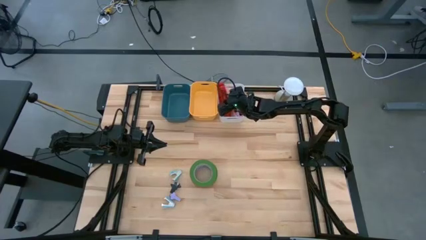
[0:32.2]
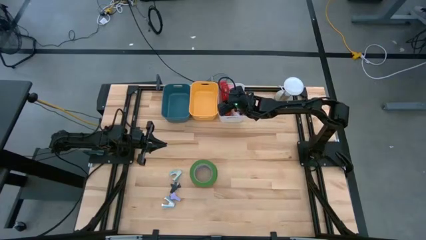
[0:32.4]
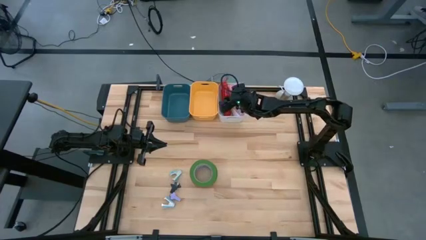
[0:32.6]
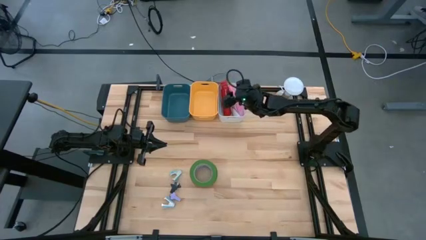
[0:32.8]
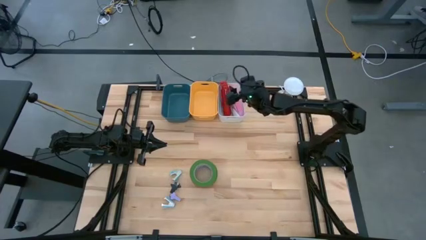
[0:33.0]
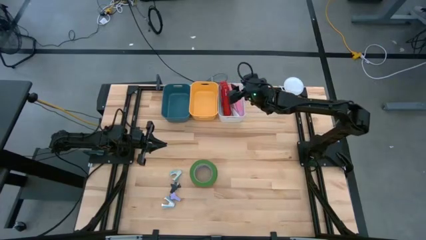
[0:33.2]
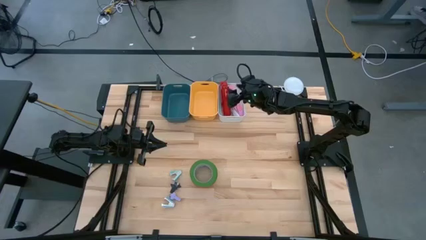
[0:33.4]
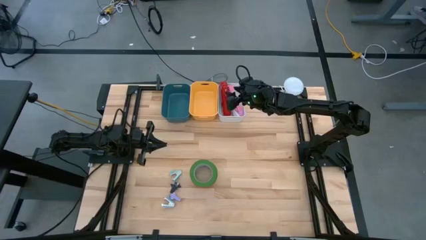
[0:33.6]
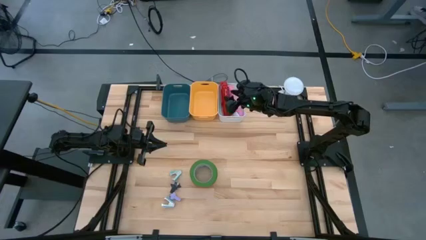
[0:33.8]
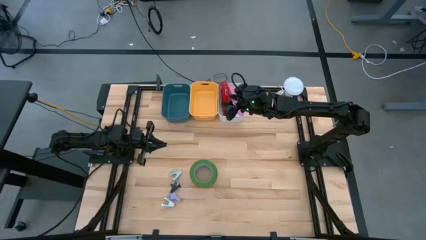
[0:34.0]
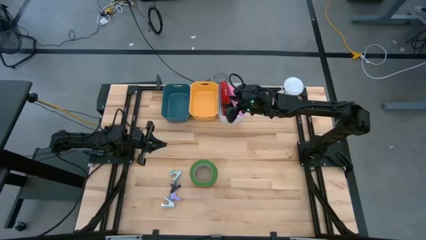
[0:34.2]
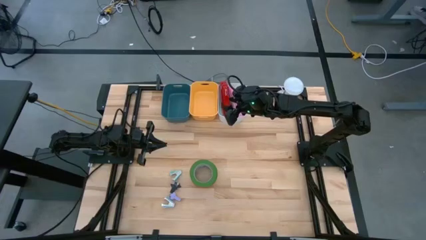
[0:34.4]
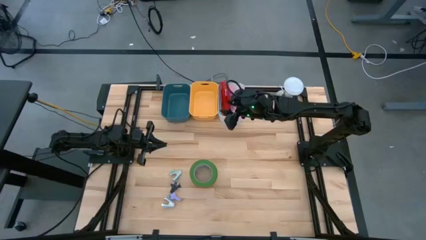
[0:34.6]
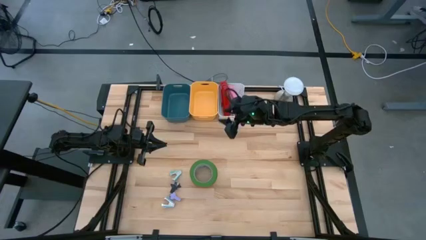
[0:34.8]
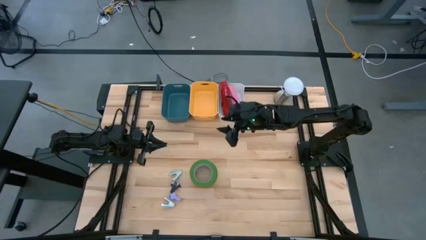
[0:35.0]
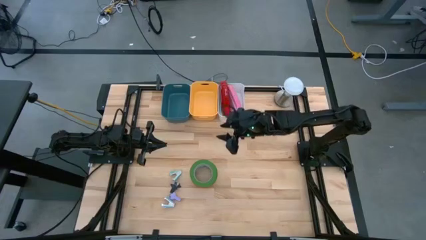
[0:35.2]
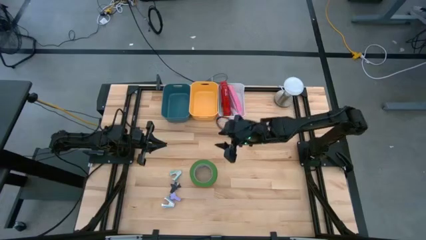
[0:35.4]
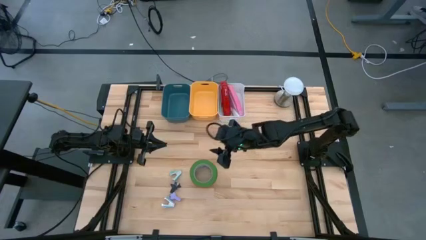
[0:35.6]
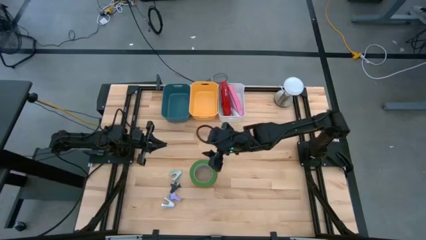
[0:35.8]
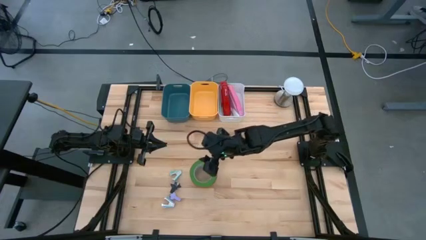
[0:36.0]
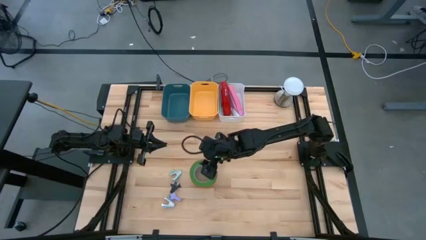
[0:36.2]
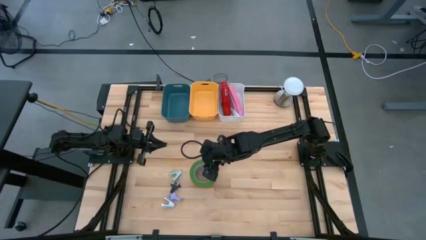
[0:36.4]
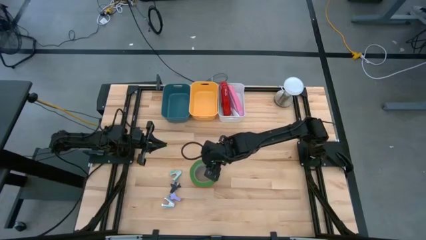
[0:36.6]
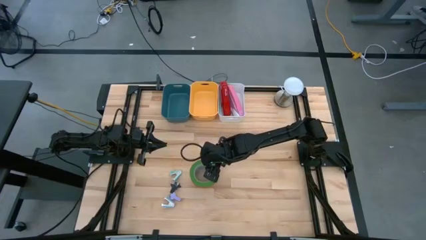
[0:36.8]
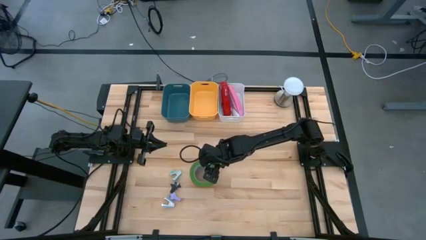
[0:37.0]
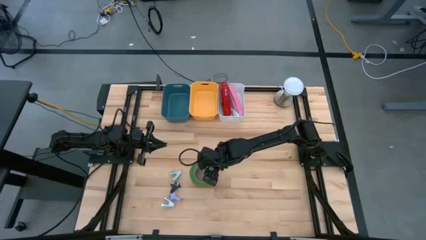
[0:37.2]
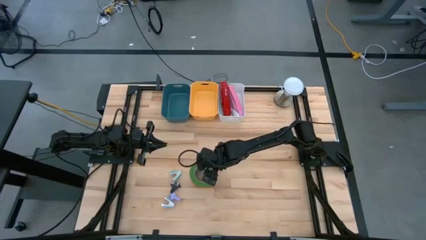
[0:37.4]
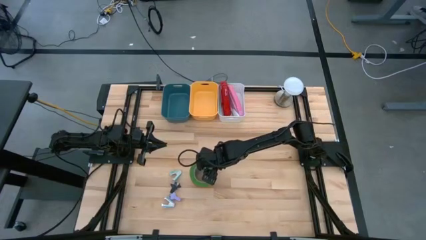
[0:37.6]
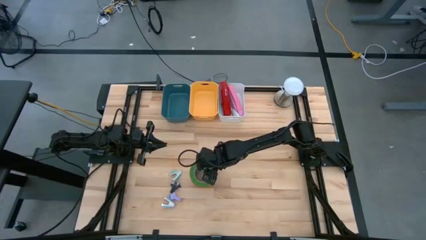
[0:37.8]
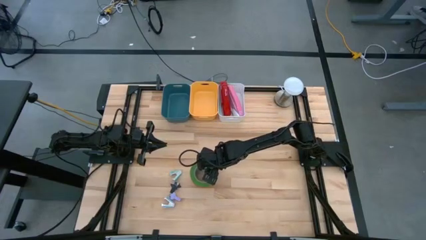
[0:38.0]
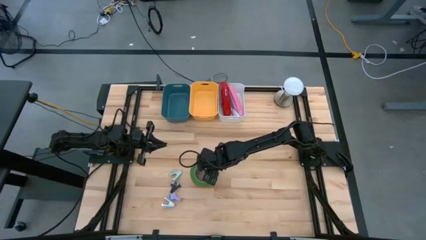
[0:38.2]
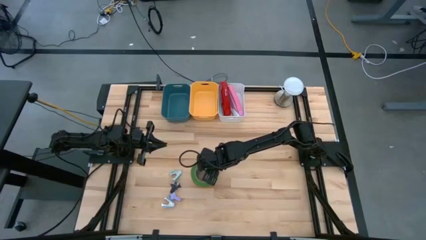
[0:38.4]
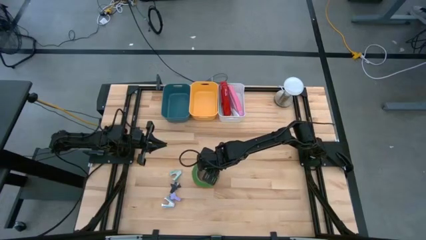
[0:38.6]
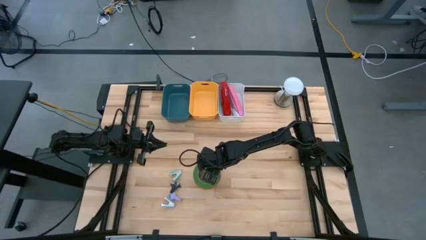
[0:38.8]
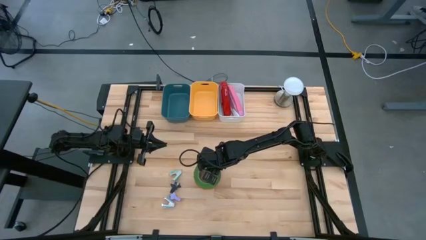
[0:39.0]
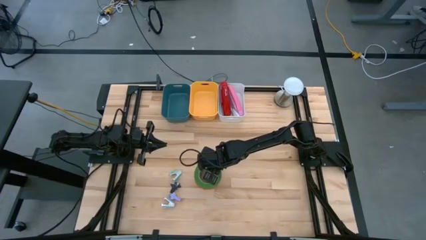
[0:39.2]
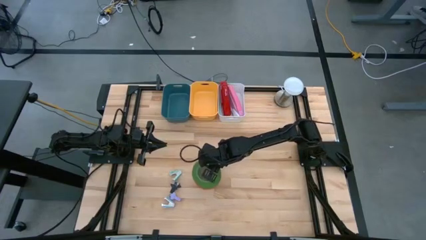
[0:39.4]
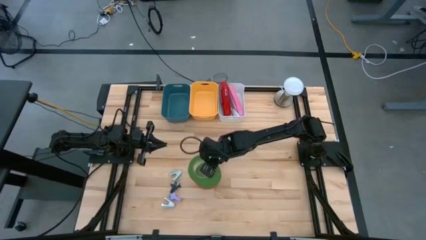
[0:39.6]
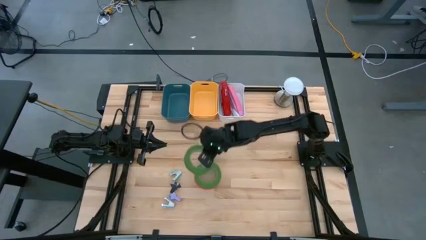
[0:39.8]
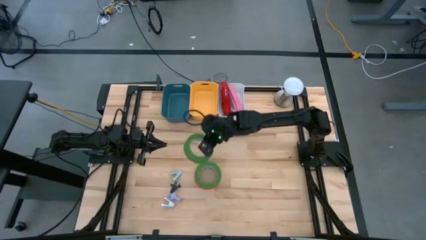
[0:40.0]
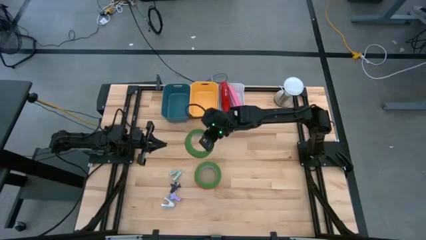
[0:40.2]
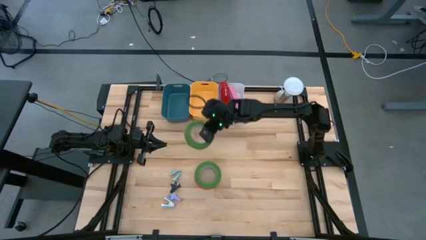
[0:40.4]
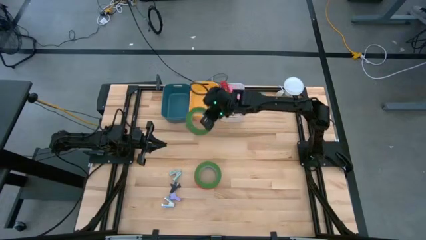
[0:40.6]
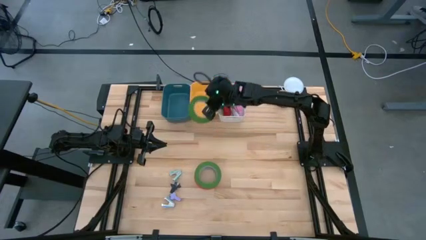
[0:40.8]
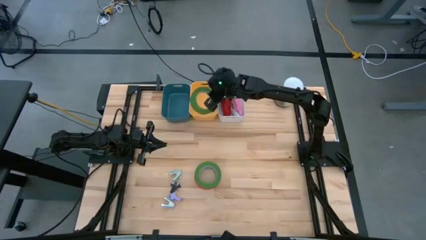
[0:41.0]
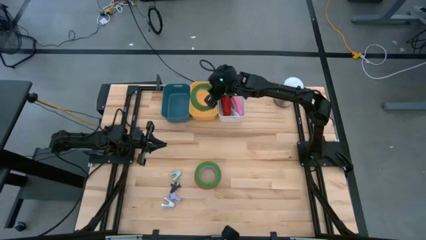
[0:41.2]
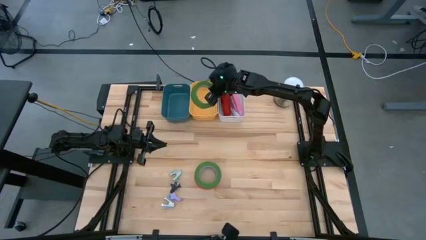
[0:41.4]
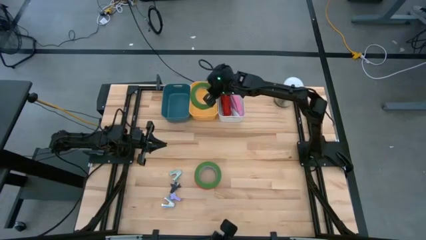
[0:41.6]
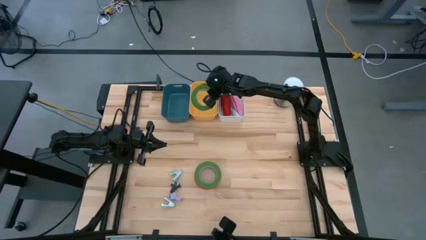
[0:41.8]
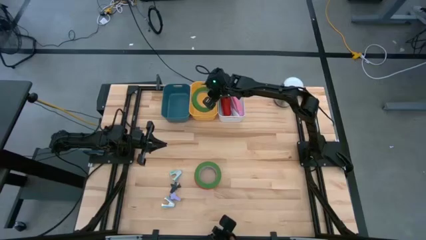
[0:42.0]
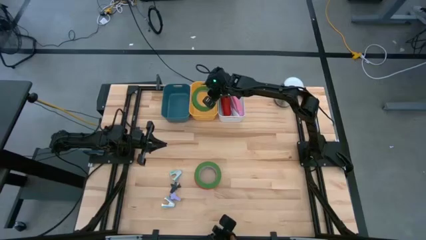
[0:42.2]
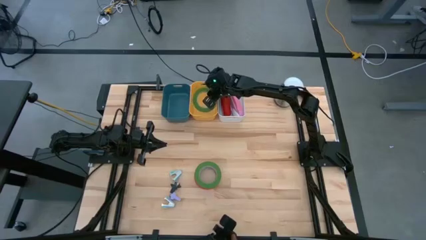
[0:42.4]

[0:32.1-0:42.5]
Task: Pick and place Stapler, Stapler remover, tape
Put the top green tape into the yellow bin

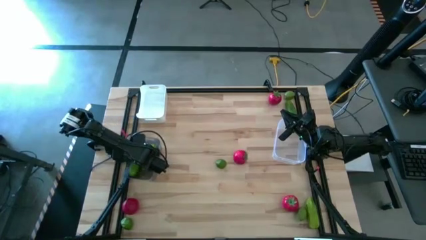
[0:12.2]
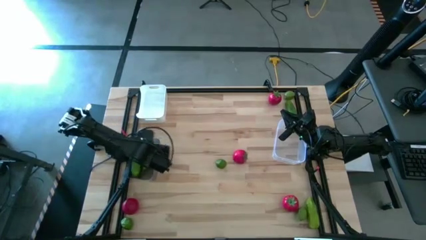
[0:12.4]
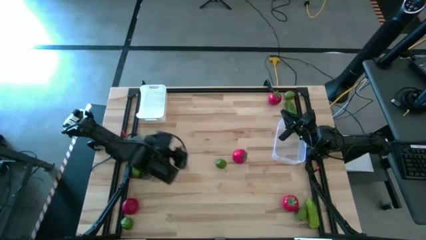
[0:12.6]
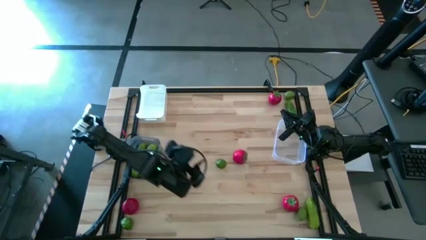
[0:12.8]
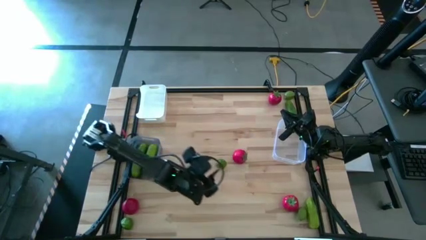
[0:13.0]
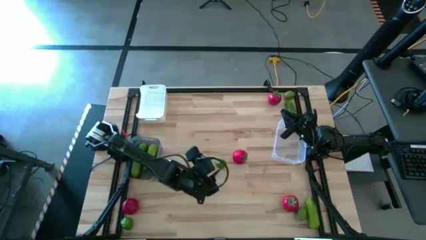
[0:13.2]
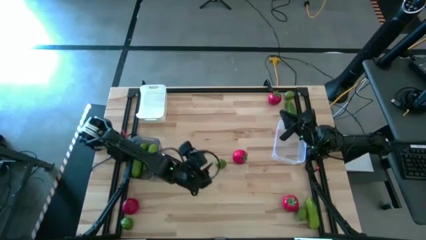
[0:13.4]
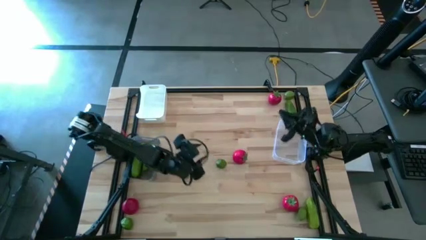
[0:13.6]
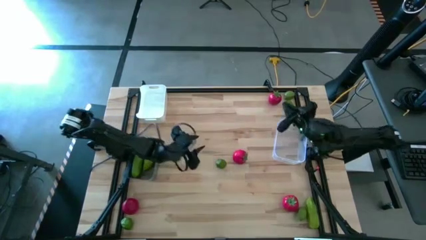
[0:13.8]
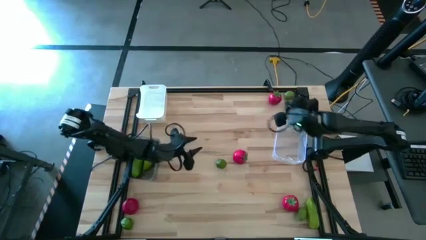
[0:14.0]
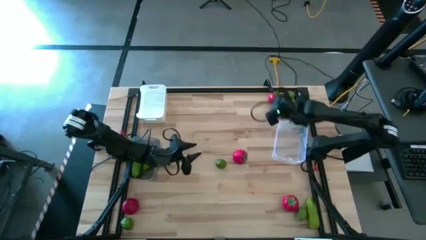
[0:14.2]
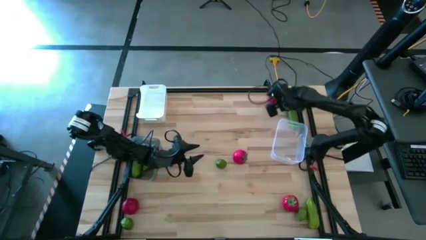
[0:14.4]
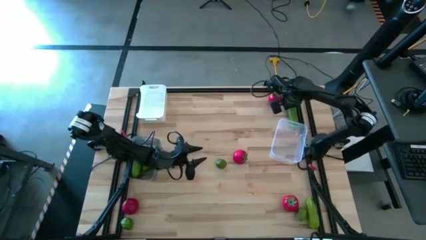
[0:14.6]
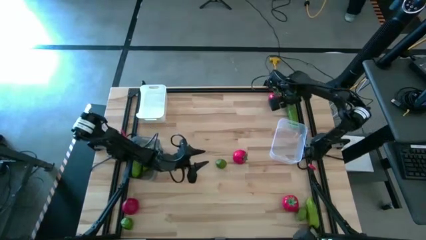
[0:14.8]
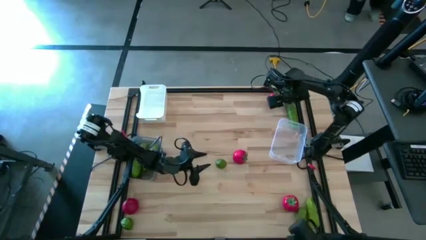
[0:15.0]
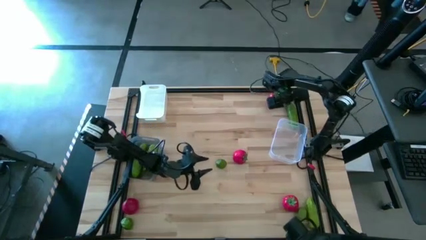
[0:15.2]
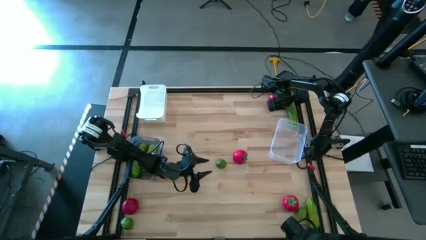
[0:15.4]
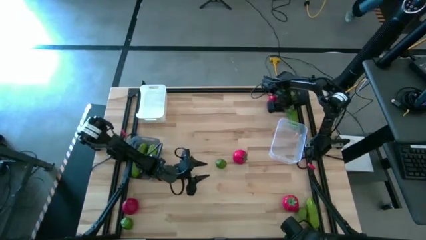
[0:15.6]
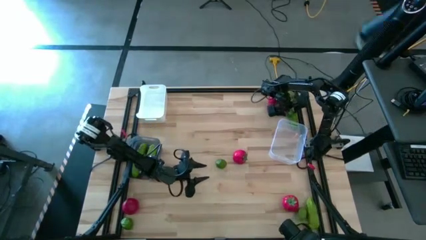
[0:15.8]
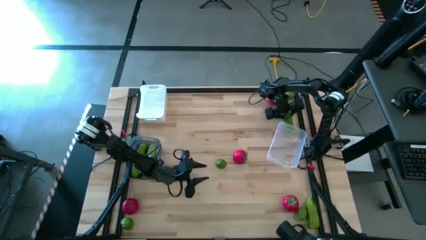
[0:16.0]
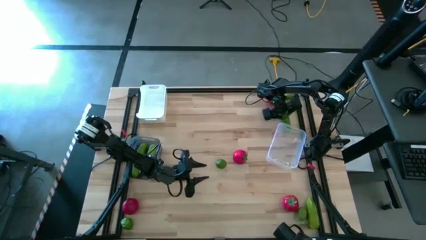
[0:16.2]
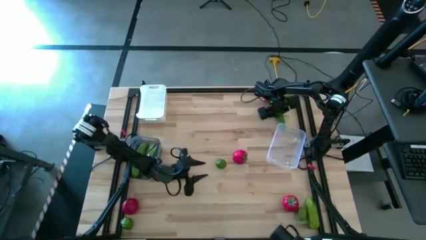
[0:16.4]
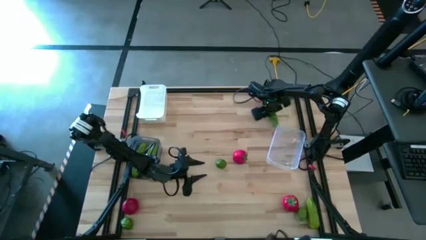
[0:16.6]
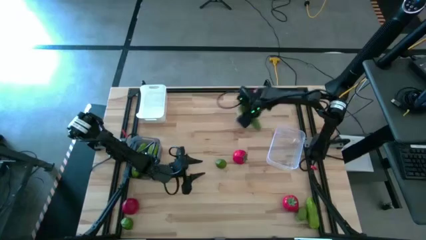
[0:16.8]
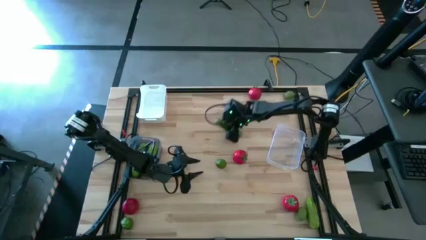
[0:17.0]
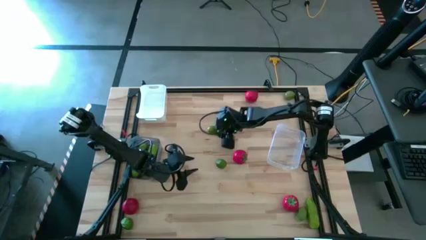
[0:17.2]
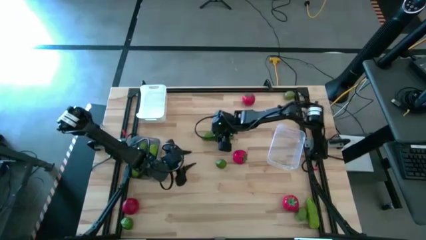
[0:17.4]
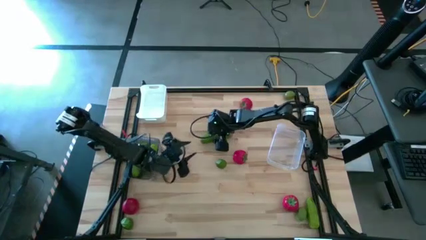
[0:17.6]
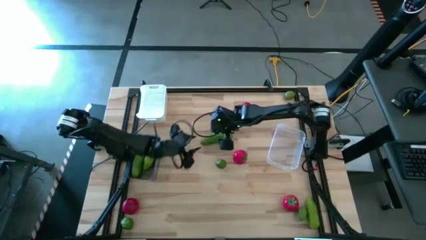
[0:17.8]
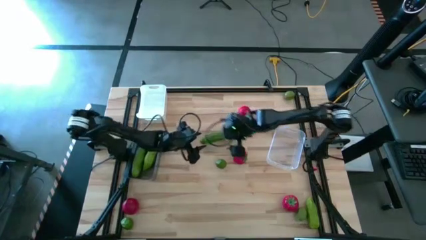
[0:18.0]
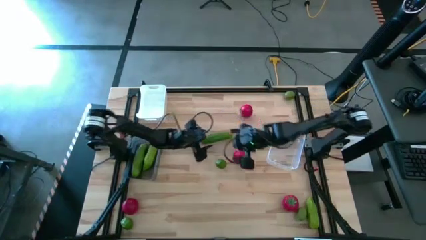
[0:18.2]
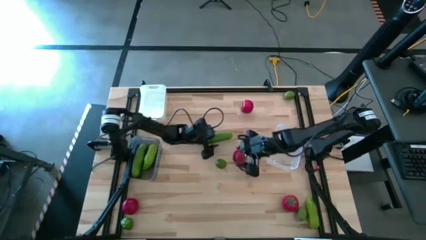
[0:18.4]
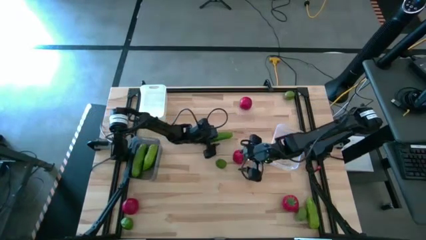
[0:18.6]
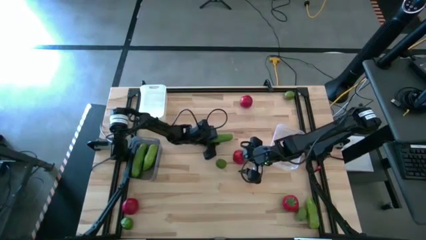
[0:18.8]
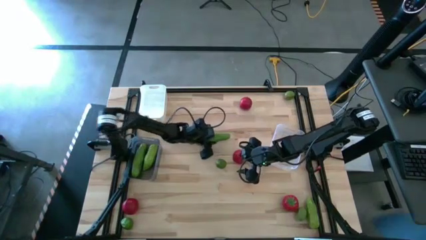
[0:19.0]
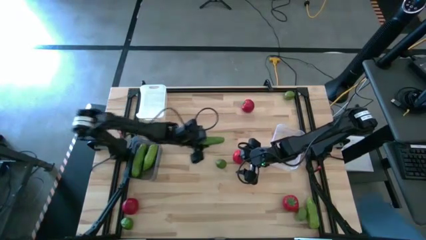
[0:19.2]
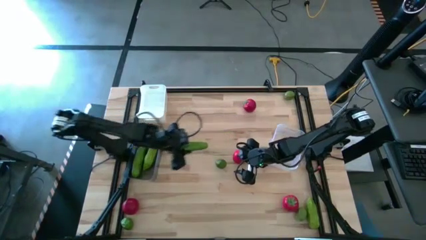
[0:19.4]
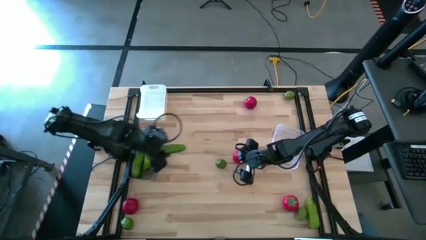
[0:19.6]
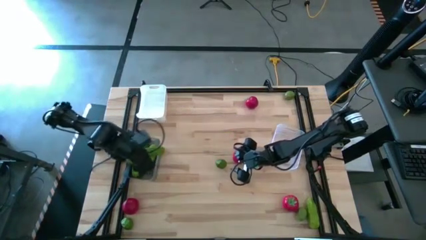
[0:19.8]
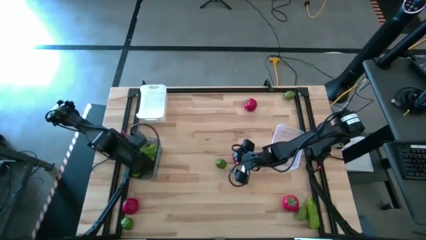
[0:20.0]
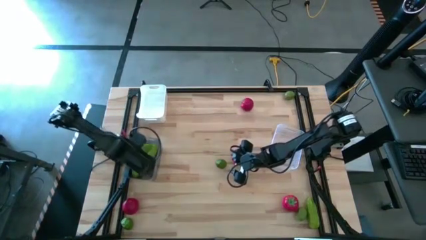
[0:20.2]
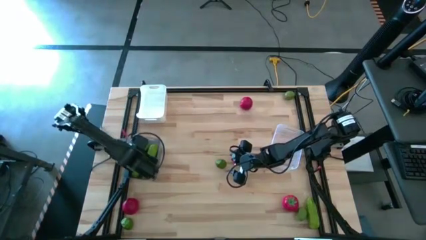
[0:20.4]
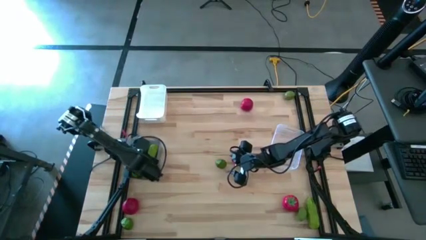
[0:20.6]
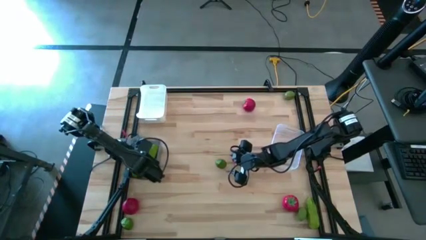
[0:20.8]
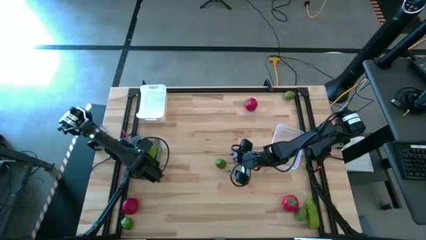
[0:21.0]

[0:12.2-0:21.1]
Task: Sort produce into baskets
Put the cucumber into the black bin
